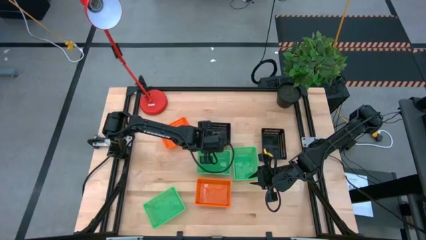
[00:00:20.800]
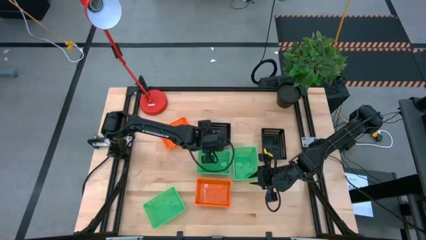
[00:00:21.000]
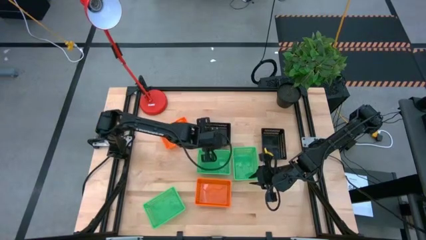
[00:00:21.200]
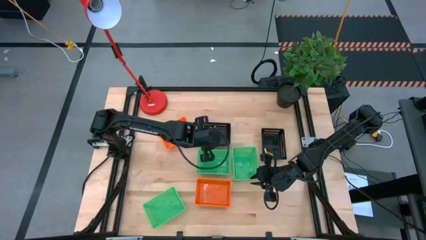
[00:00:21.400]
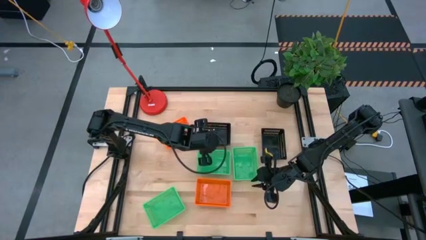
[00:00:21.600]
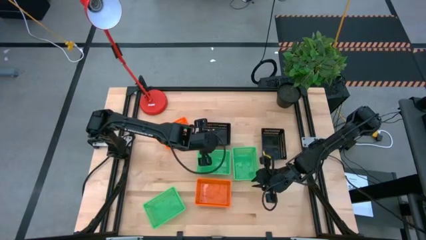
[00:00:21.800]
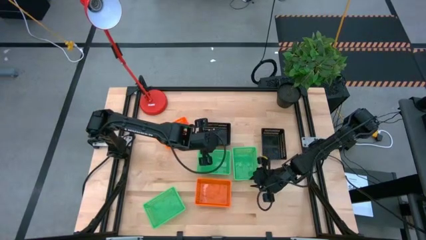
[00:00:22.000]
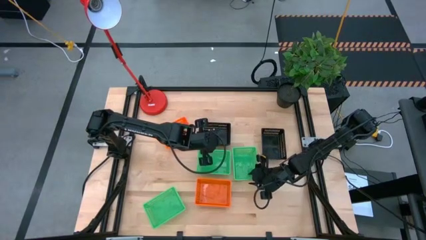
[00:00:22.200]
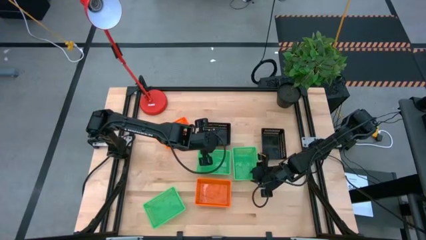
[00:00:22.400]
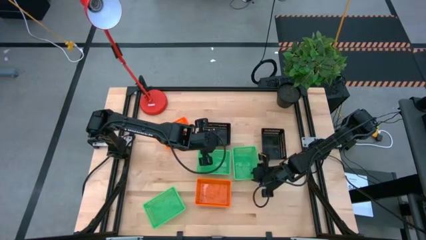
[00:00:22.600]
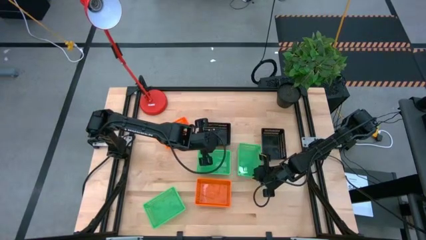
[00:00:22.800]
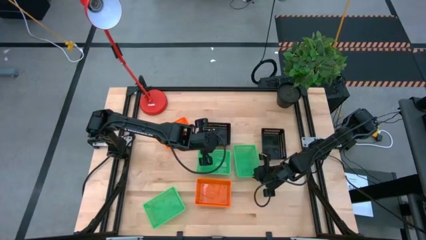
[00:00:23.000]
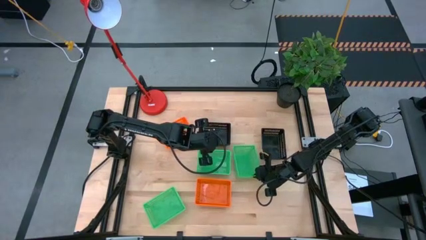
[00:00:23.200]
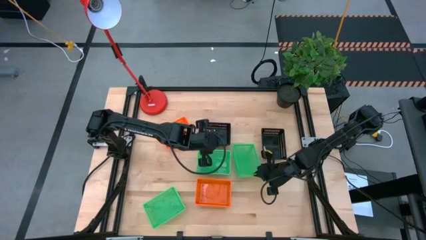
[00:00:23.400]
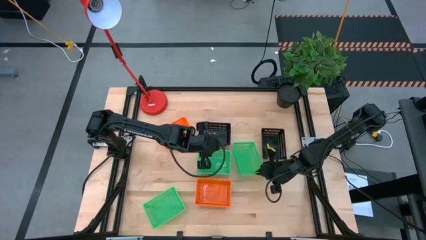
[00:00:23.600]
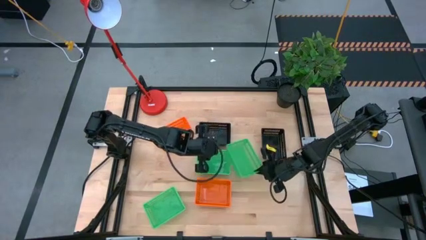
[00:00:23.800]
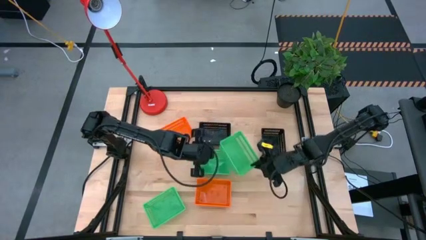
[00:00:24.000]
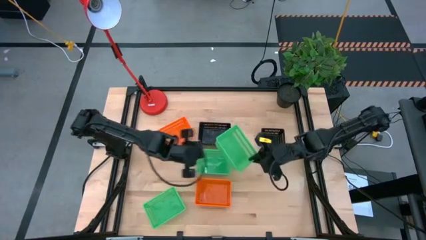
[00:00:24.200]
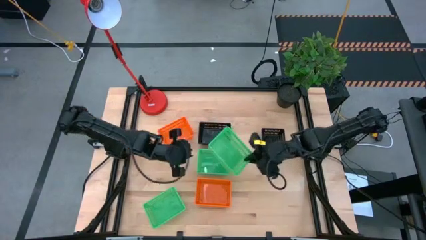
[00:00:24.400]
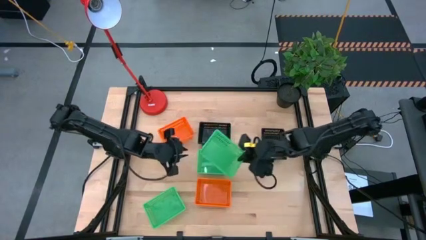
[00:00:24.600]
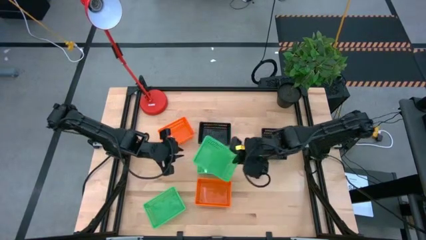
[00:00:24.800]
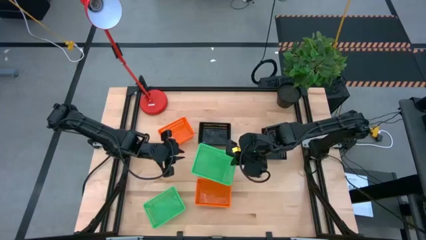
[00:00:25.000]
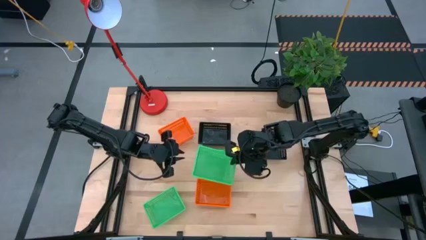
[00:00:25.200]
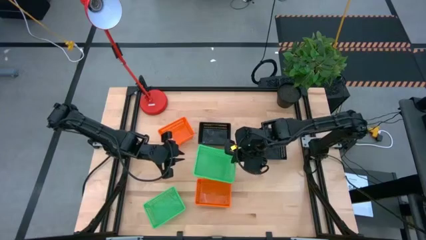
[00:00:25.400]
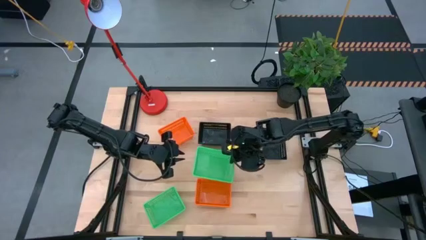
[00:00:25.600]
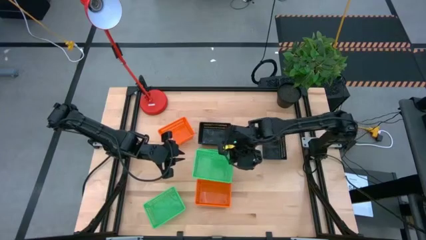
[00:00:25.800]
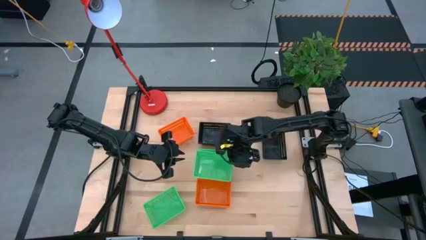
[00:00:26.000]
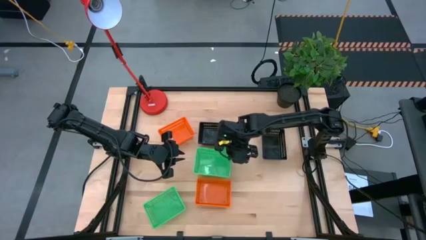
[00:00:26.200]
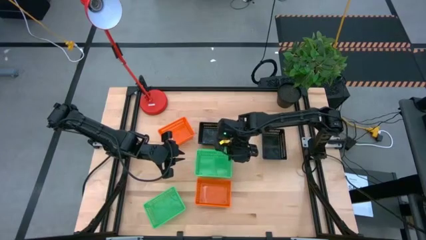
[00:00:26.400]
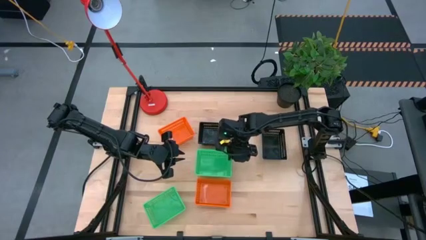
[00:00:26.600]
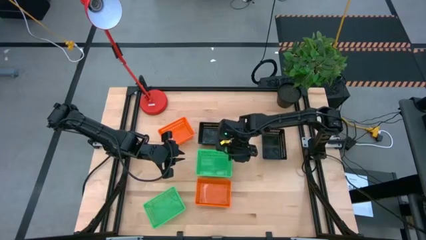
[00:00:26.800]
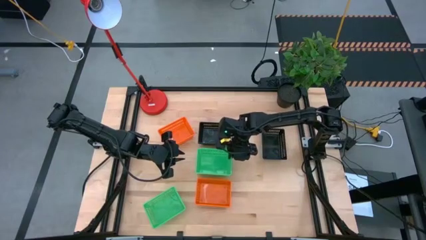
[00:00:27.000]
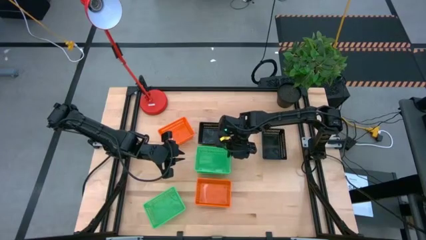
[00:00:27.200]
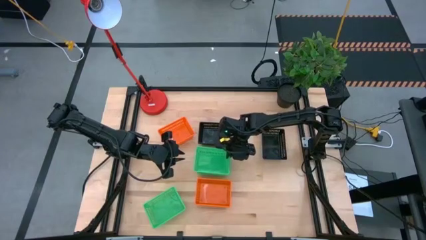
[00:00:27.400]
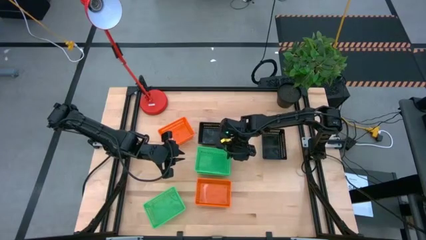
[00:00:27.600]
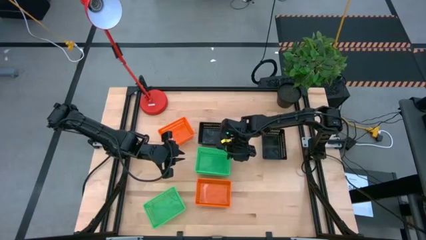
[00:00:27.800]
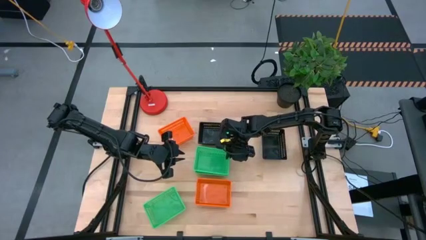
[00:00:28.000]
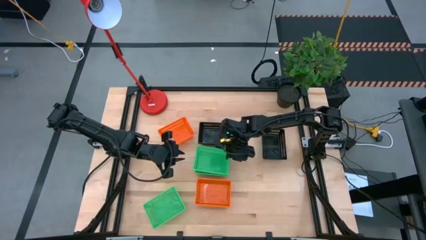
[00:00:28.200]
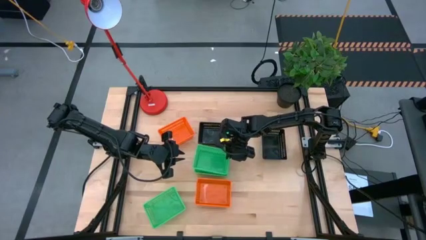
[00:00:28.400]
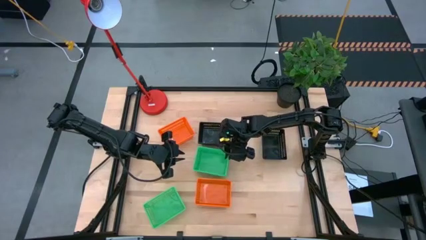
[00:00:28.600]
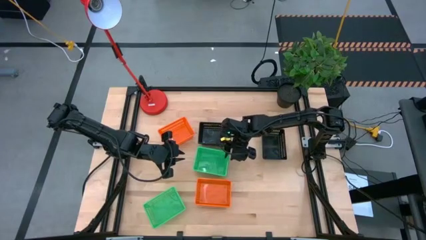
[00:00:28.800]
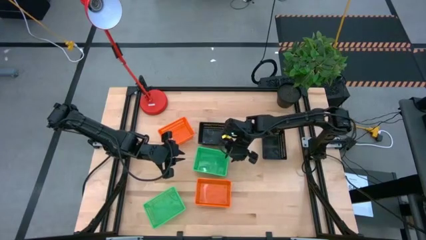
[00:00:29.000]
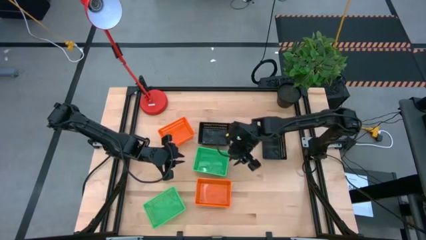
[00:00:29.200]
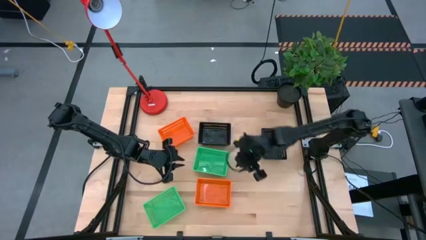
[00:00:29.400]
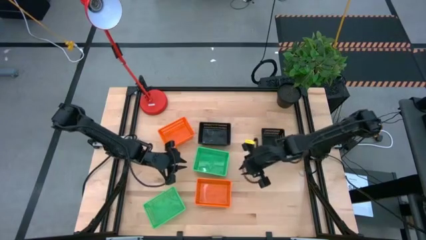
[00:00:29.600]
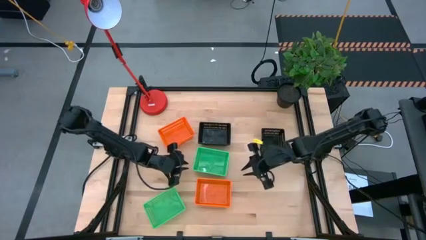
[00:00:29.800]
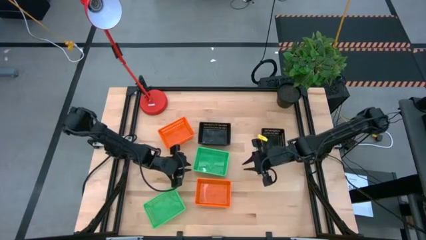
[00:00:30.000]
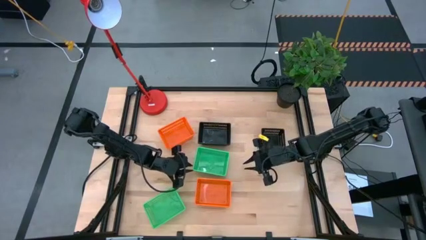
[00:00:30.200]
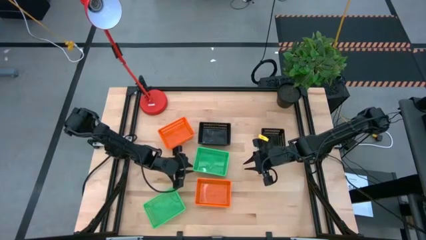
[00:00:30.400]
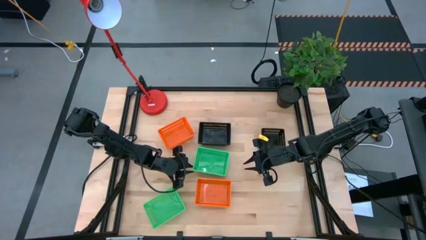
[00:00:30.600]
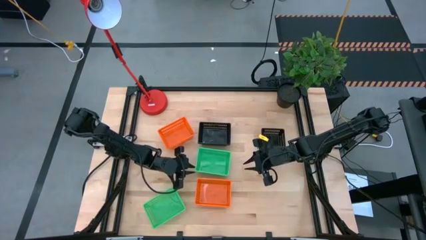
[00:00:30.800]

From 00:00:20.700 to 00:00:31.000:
Stack the right green bin on top of the left green bin

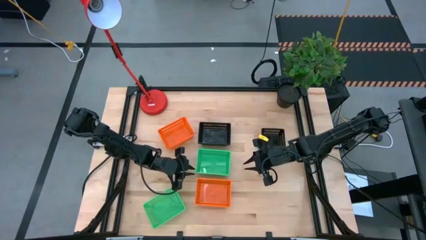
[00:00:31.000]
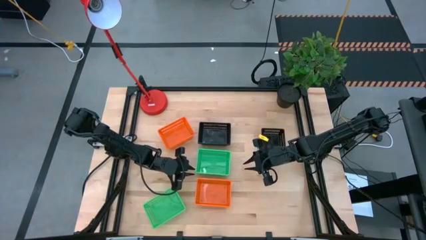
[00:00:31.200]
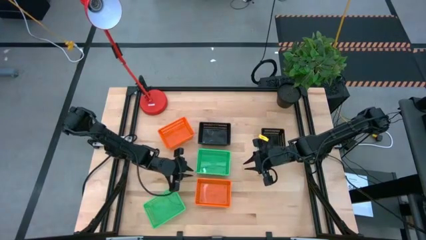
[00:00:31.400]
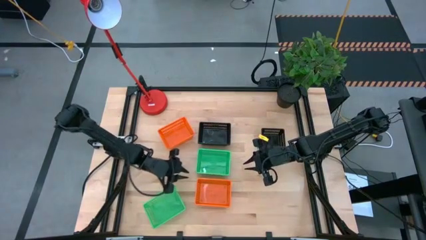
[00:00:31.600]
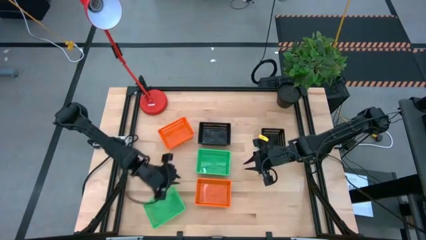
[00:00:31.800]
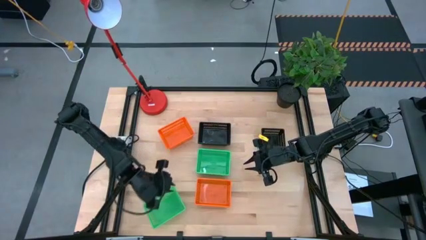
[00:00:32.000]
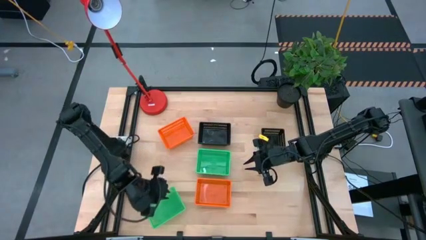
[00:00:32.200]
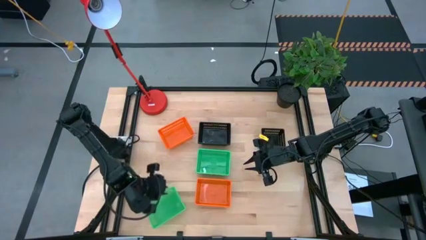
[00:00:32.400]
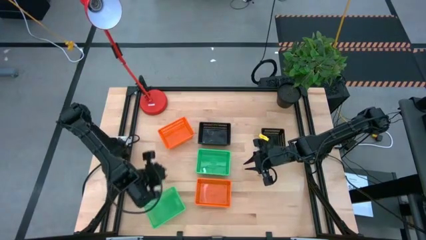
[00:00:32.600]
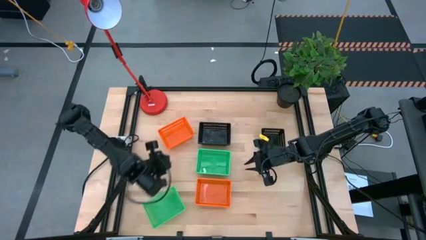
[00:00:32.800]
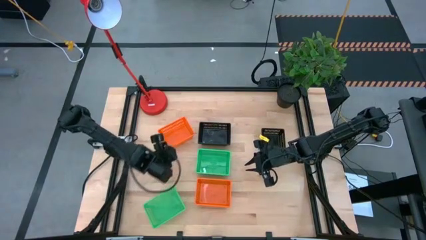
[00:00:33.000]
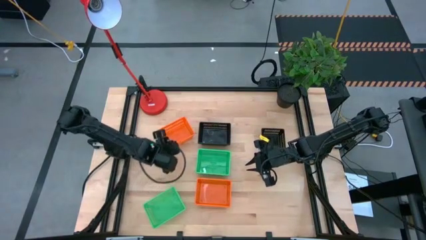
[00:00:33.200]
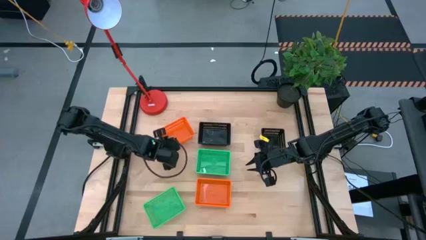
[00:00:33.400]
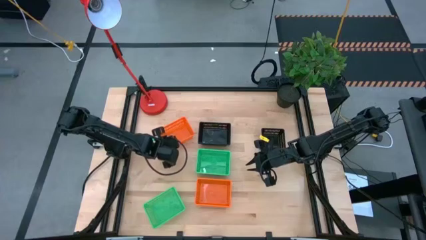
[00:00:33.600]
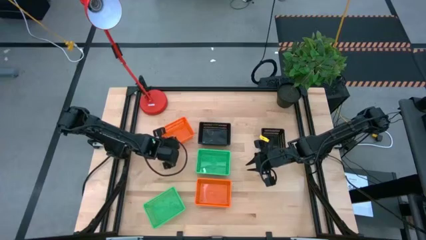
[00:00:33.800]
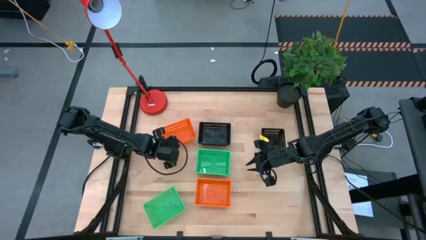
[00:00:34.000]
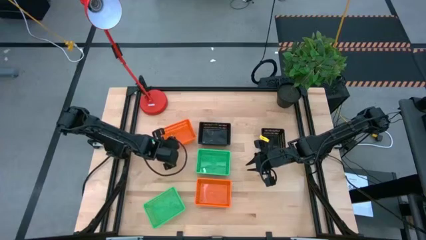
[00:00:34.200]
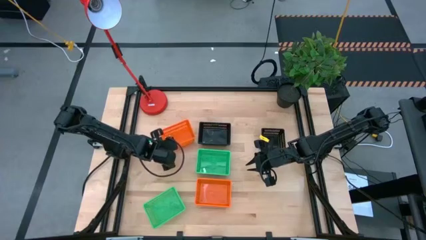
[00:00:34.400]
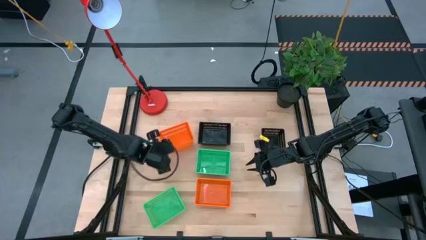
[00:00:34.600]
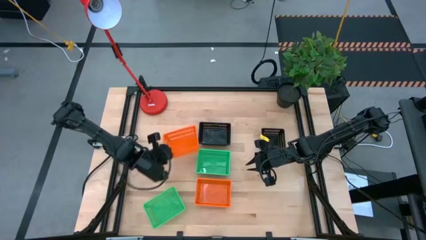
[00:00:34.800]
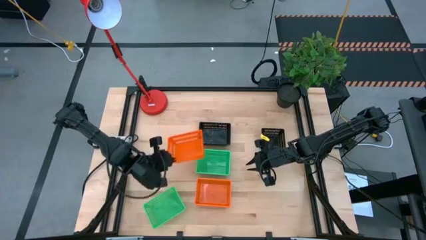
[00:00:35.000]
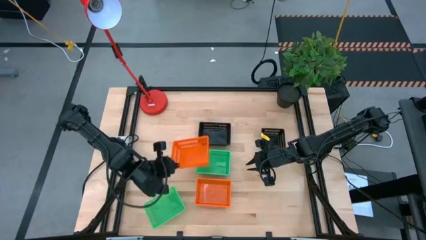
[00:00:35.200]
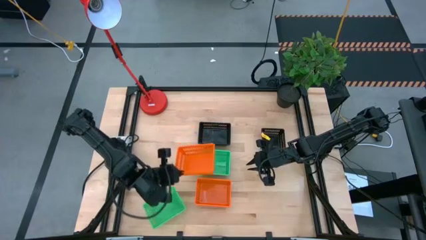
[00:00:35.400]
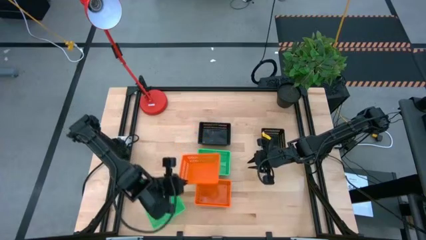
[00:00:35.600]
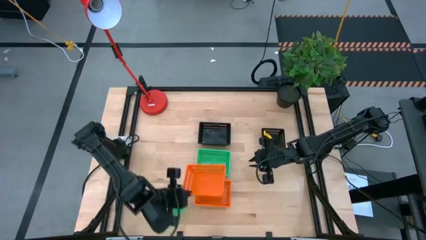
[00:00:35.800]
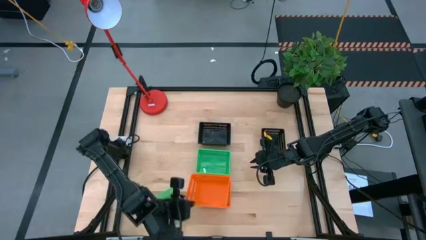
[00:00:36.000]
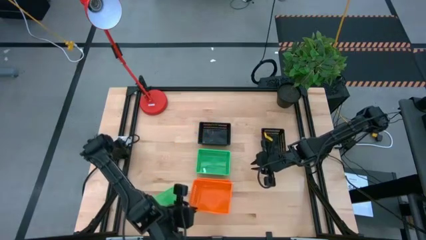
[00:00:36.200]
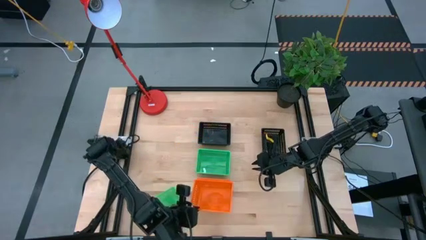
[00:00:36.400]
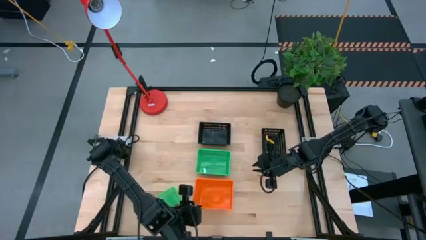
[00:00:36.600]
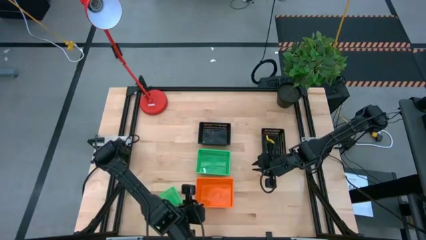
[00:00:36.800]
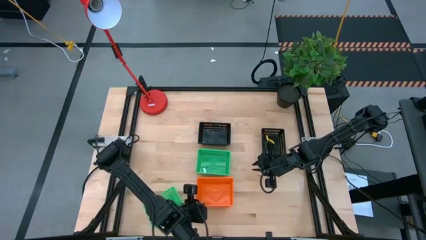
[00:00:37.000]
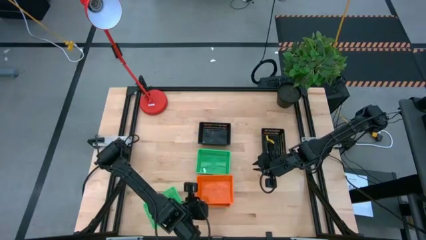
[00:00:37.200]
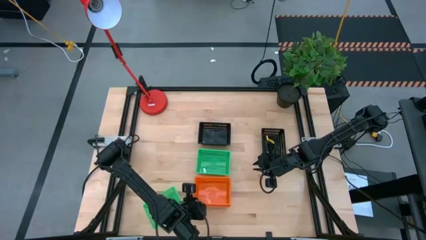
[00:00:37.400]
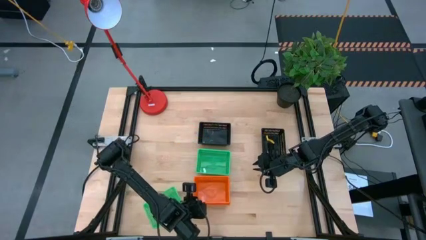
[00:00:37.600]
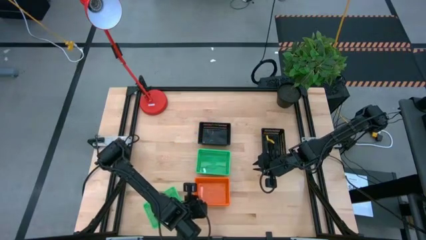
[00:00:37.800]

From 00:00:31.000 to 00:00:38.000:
Stack the top orange bin on top of the bottom orange bin
